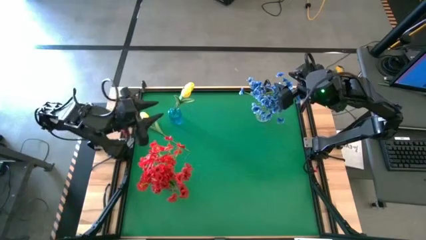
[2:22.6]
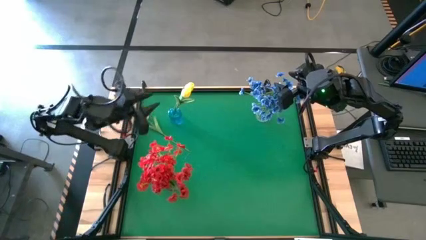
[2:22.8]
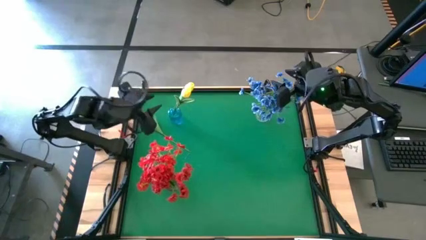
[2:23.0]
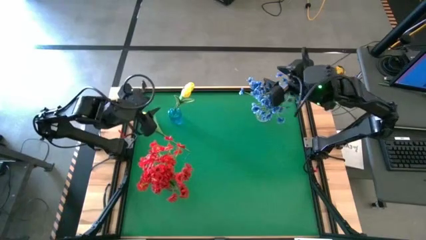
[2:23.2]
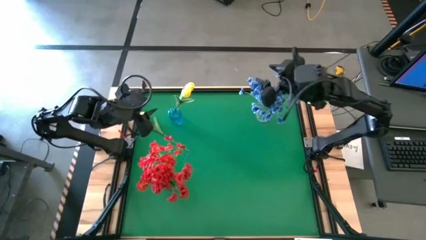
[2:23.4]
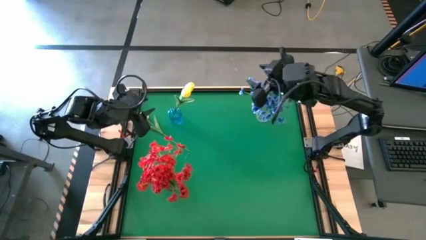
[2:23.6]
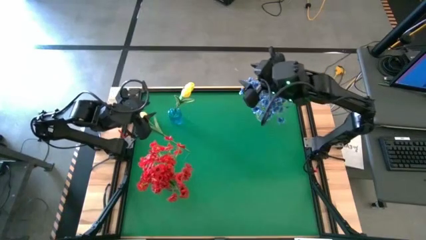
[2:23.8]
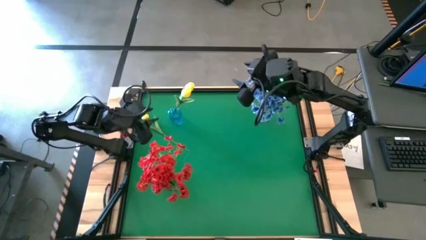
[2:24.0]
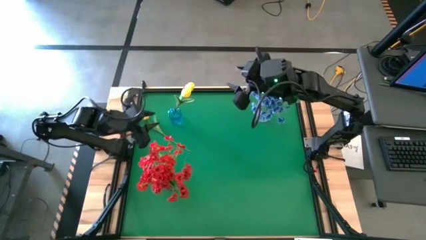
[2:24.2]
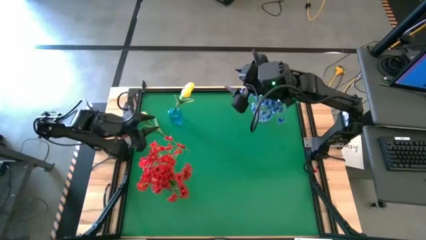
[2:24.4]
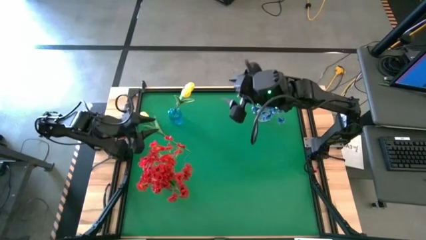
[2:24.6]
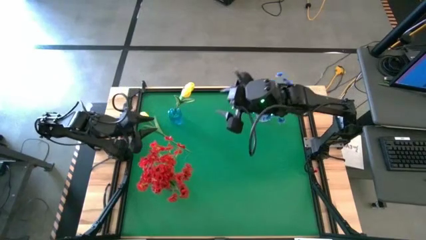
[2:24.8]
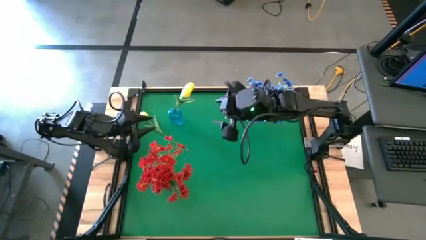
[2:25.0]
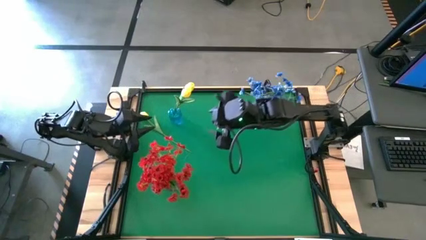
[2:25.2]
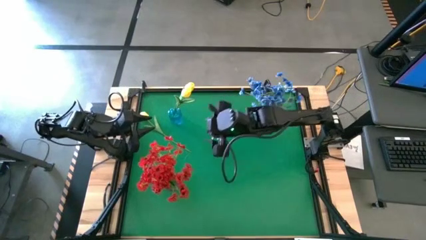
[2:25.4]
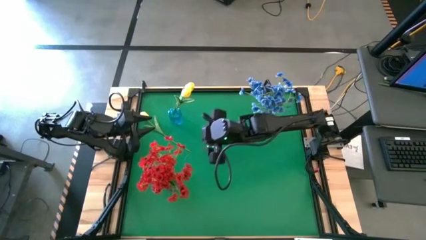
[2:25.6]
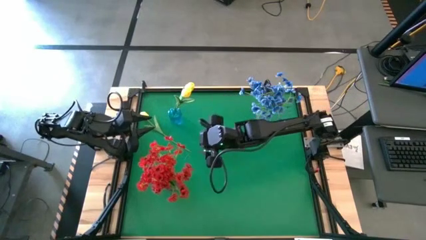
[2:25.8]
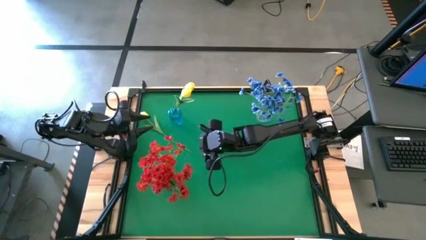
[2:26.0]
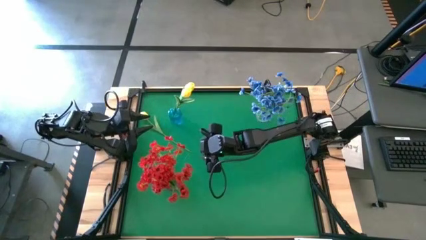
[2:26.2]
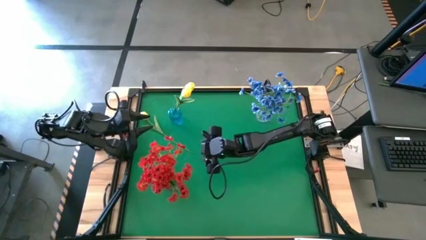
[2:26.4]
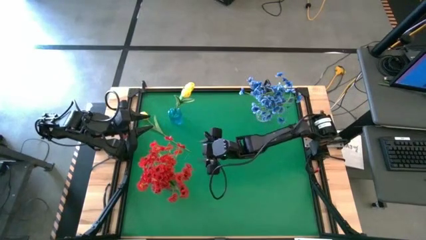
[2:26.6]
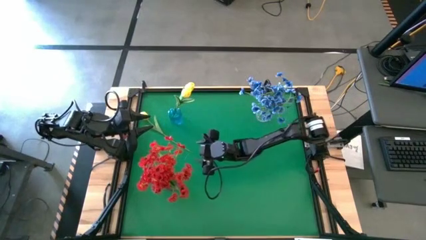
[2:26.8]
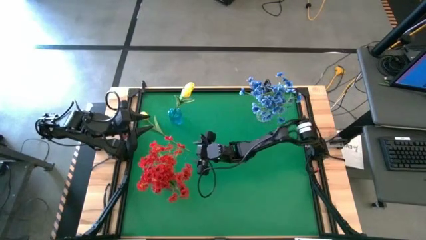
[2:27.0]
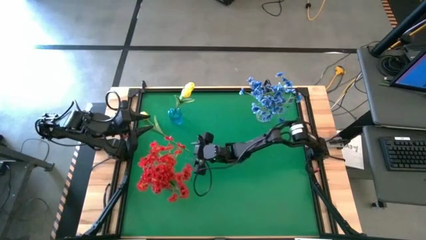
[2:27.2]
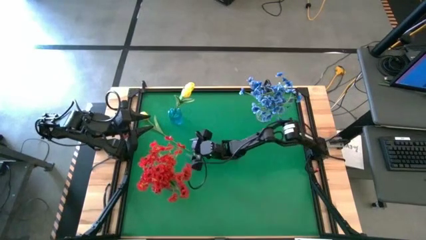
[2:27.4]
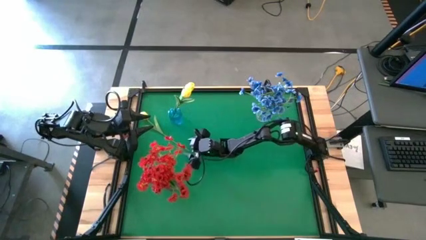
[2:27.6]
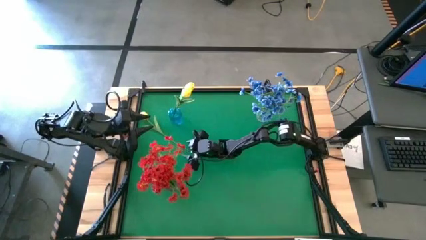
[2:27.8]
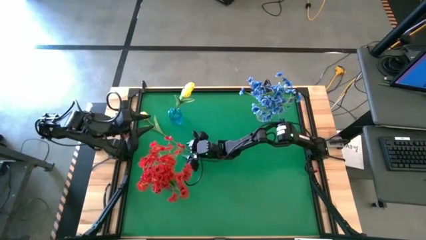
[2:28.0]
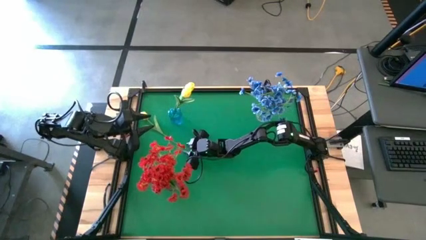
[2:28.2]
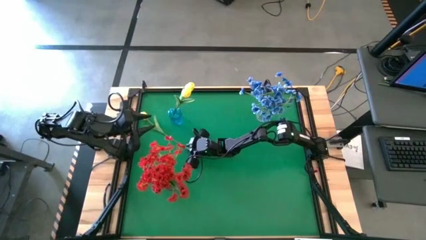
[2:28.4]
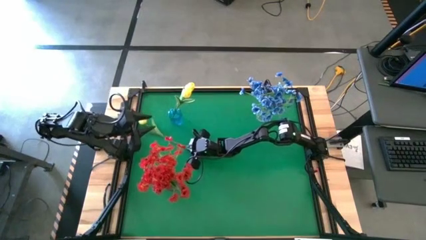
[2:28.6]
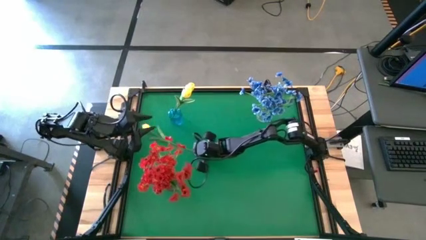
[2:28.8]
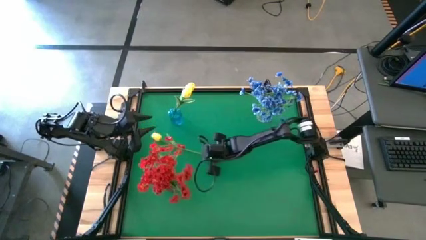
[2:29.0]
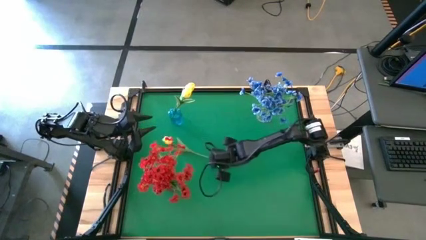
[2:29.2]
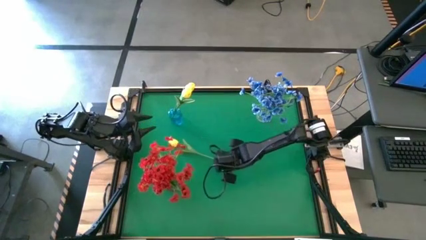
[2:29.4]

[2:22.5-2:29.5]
Task: Sort flowers into vase by color
Put the yellow flower into the blue vase

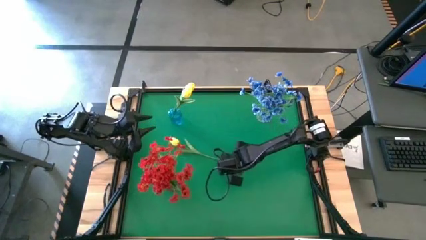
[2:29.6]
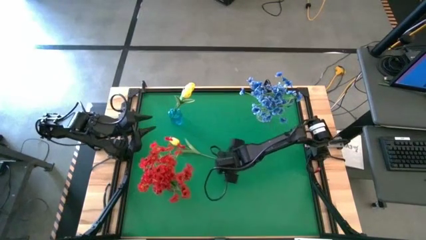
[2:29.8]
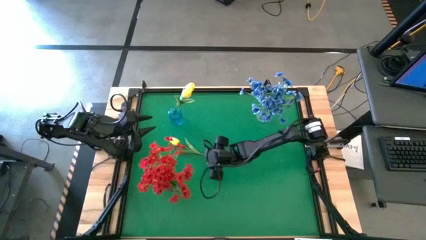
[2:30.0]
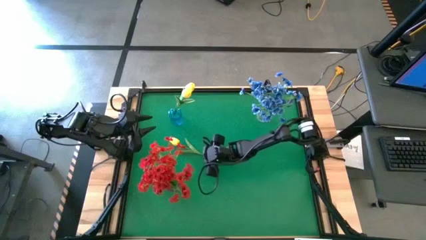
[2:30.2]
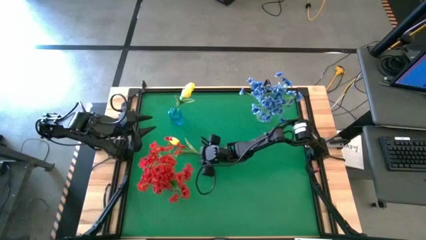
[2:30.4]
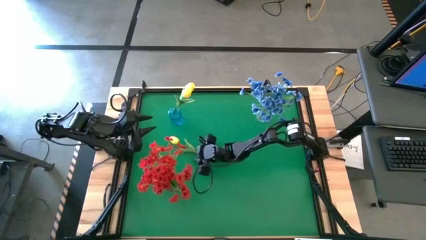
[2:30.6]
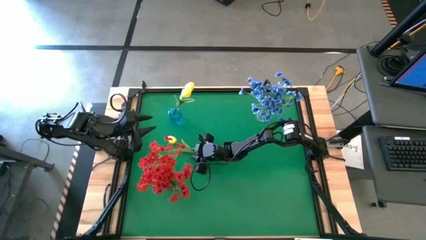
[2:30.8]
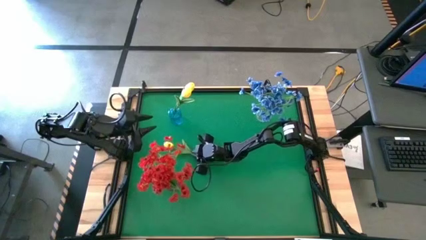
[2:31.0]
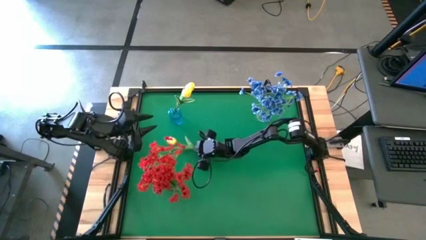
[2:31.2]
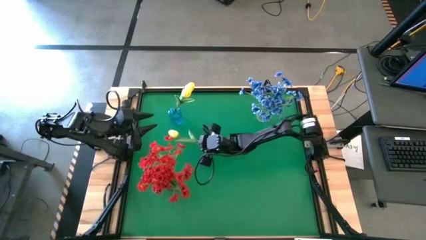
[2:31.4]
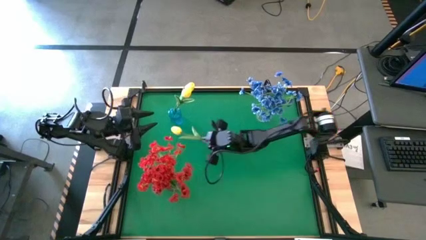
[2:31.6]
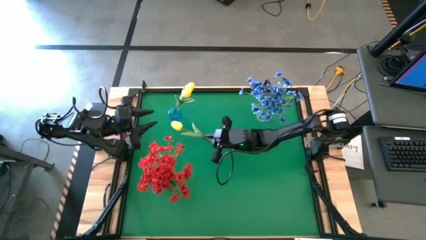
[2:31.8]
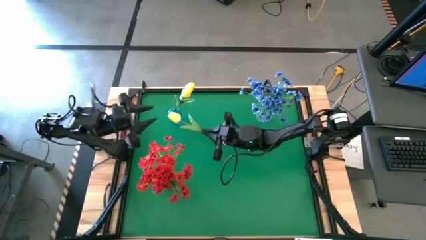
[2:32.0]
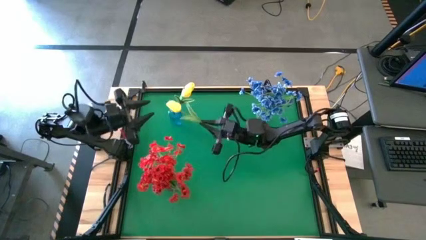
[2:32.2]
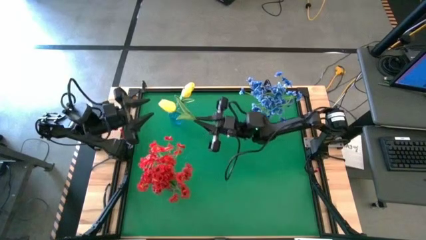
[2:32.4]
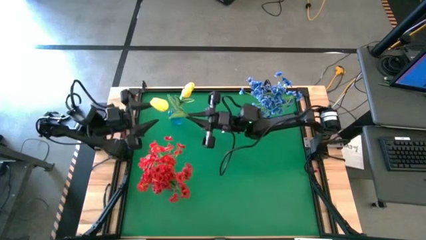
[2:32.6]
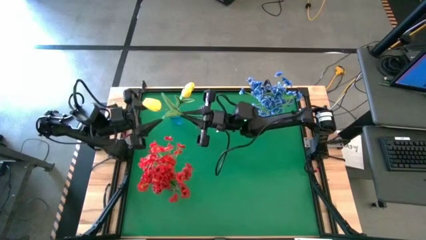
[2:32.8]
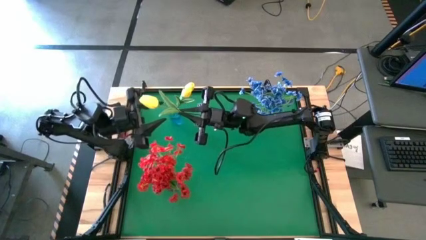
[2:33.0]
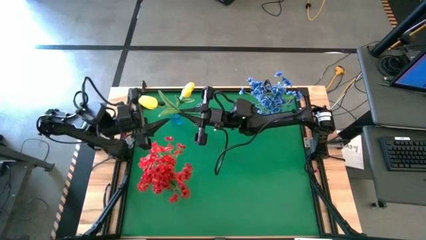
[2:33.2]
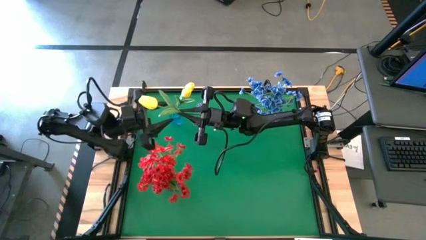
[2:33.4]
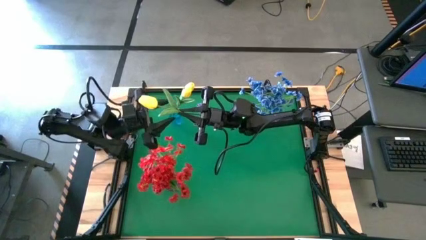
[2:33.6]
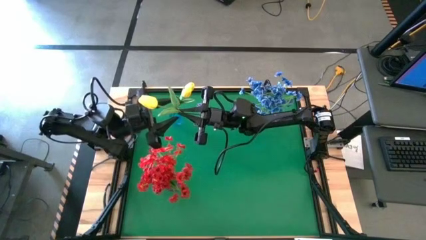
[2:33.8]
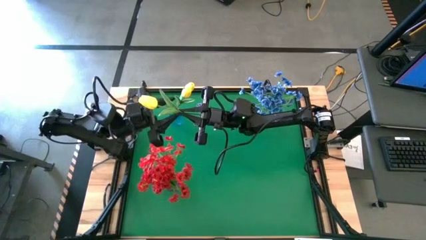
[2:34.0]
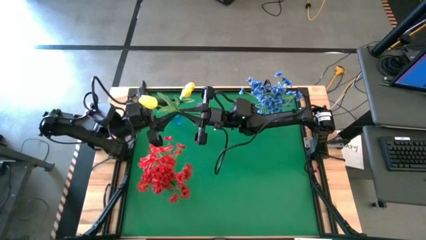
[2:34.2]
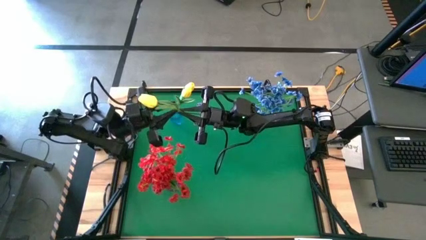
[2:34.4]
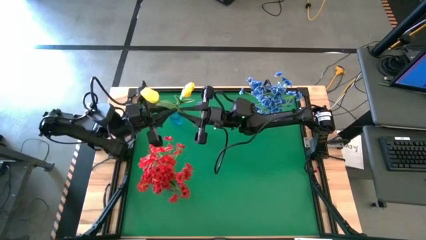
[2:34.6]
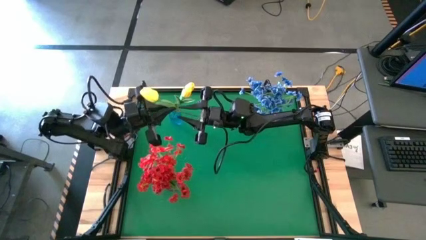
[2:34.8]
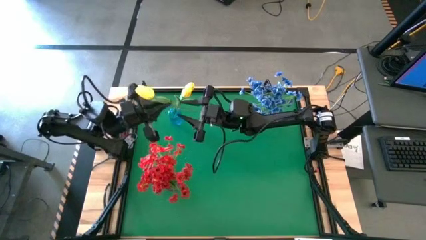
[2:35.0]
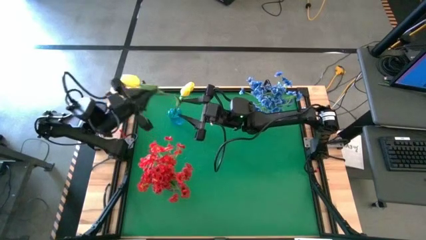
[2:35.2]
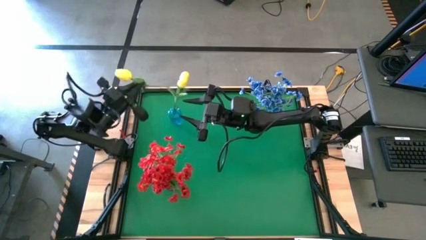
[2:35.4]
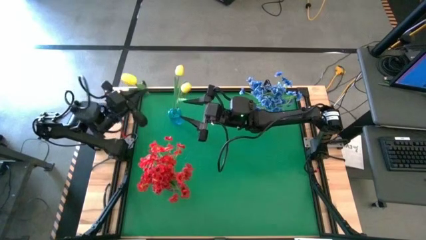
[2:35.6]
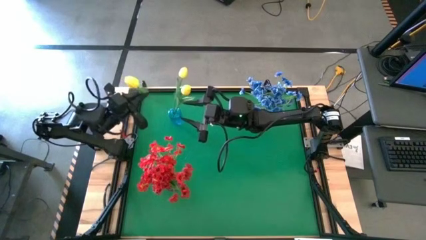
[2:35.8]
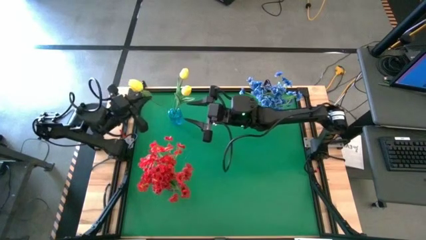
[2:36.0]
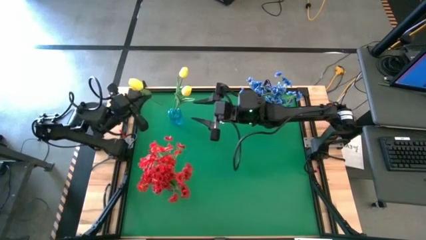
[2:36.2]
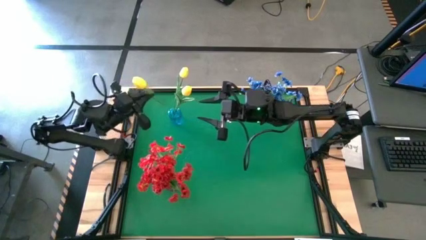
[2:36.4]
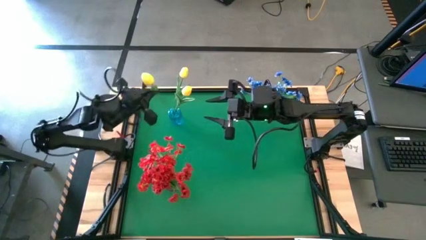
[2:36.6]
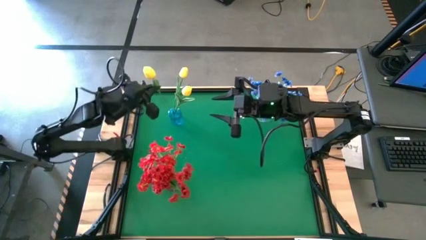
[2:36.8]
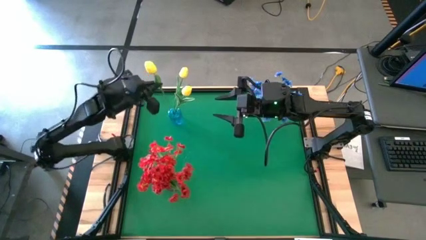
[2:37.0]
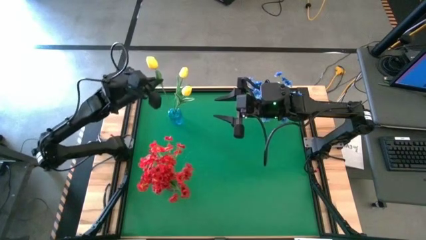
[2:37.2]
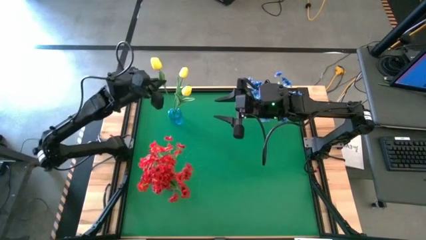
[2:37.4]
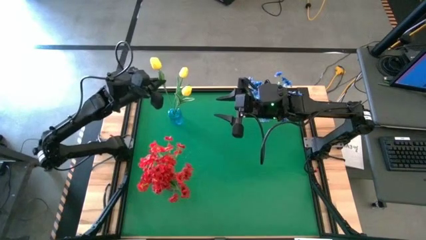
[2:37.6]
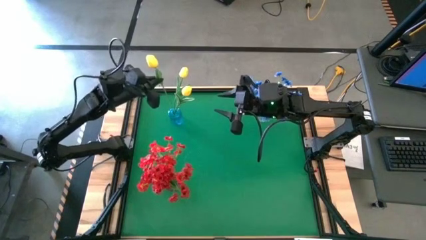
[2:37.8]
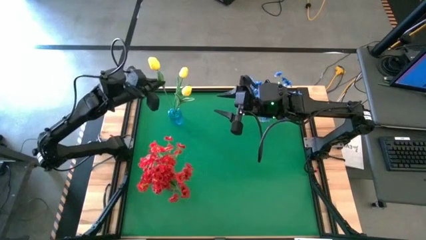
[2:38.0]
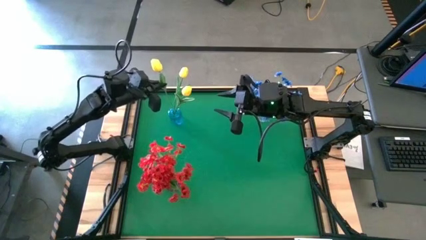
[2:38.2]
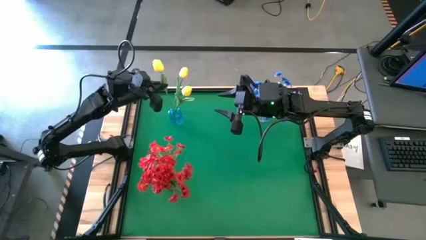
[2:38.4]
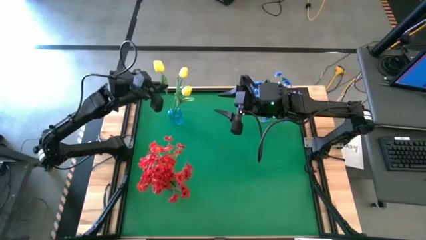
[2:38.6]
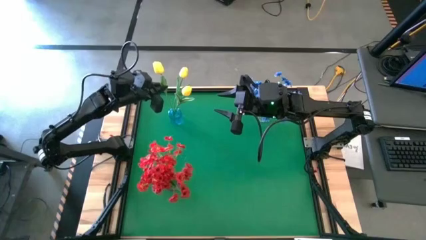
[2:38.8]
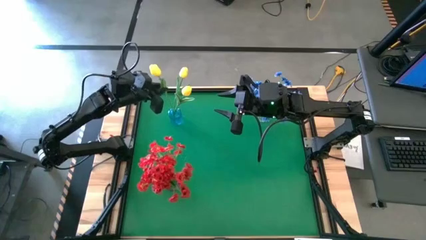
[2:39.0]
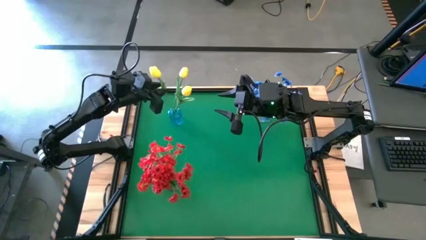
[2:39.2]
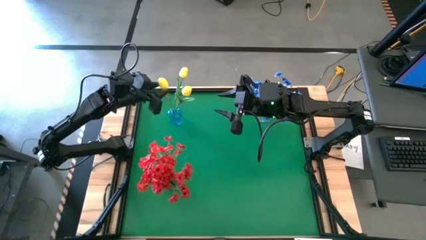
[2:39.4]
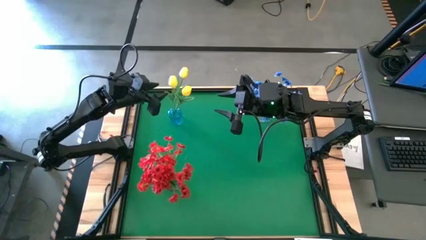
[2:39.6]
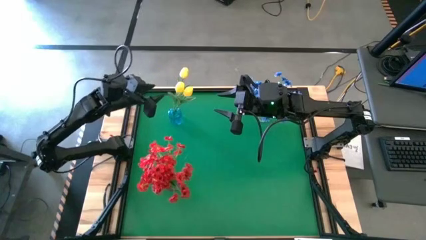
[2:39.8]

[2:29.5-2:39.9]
Put the yellow flower into the blue vase
